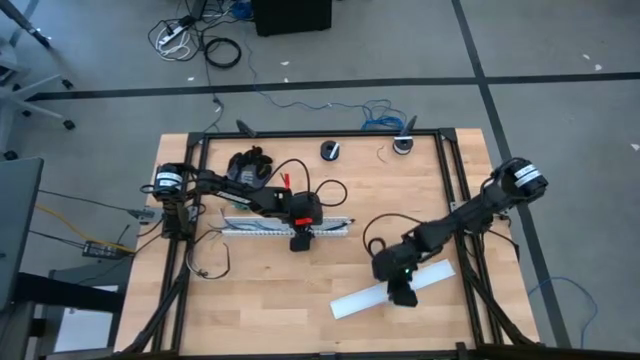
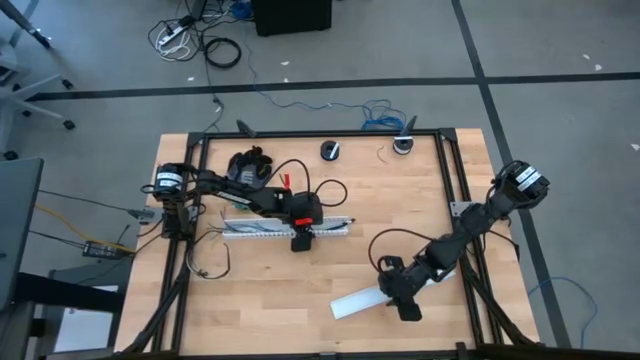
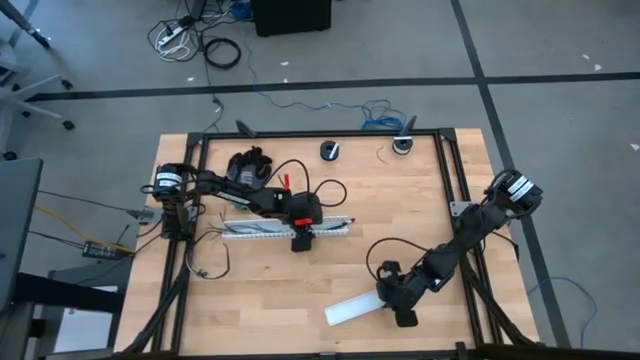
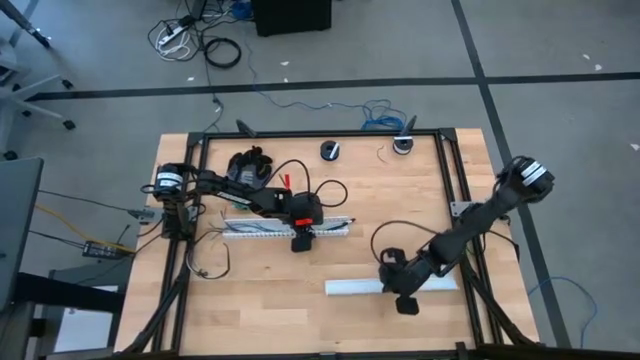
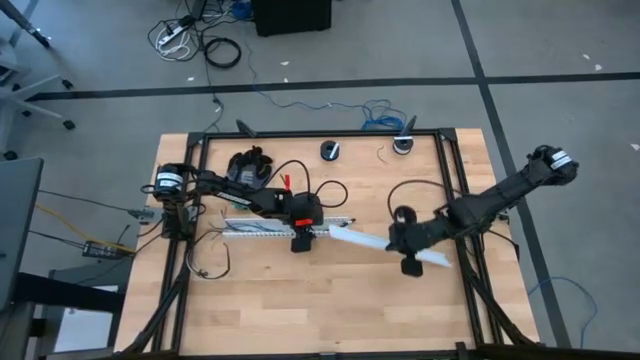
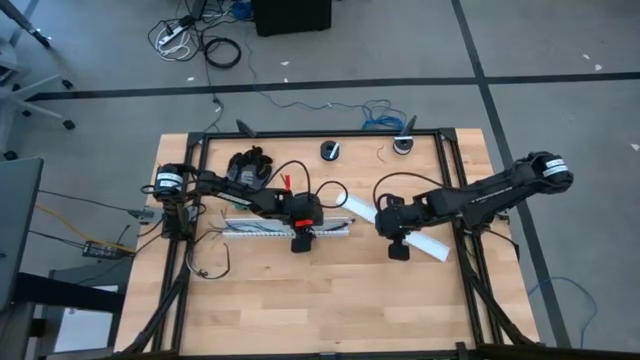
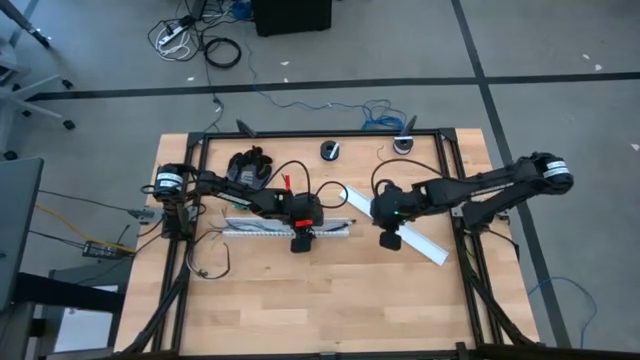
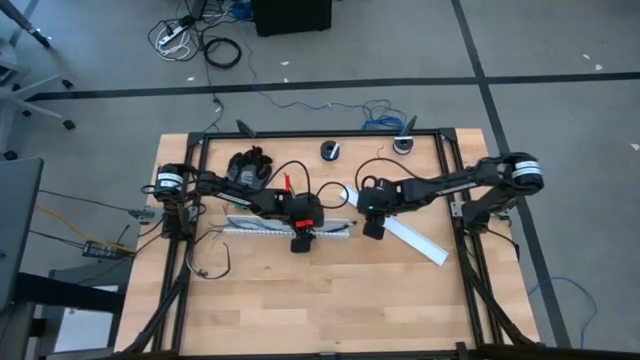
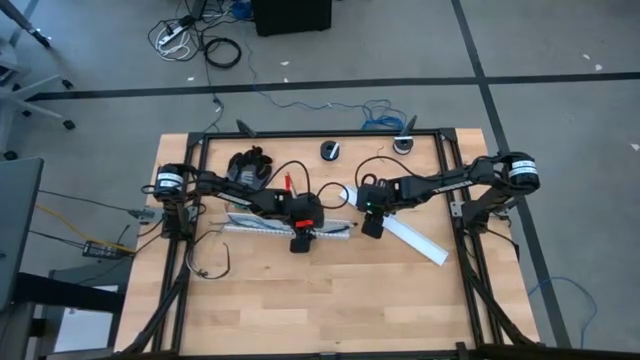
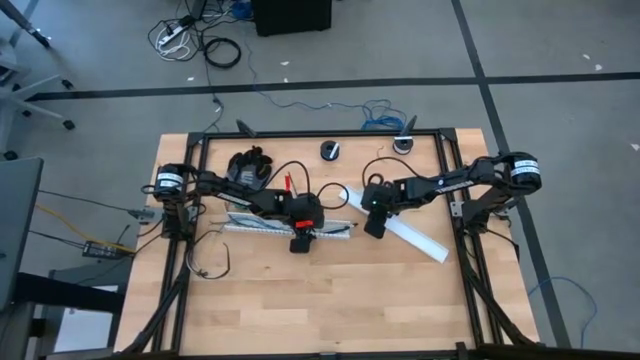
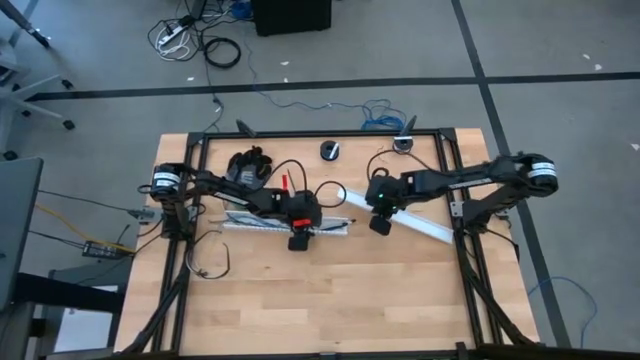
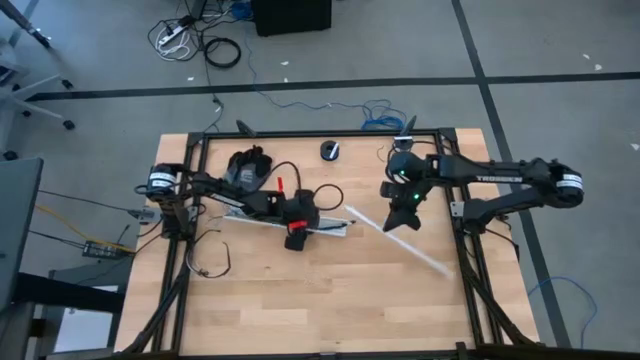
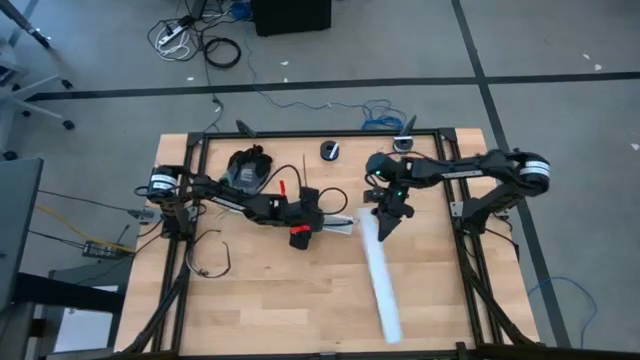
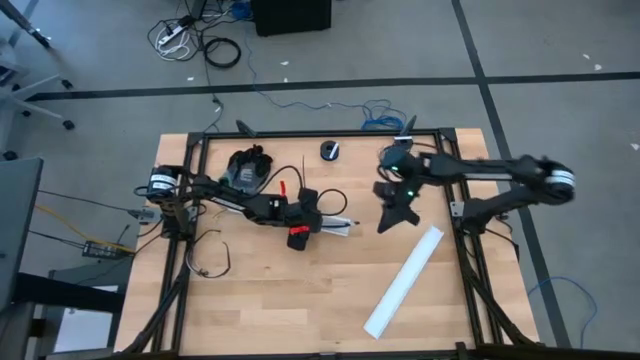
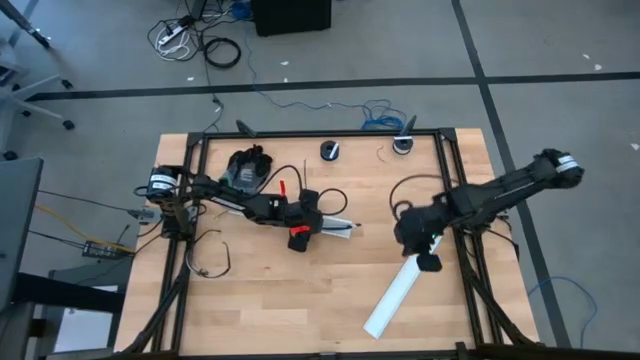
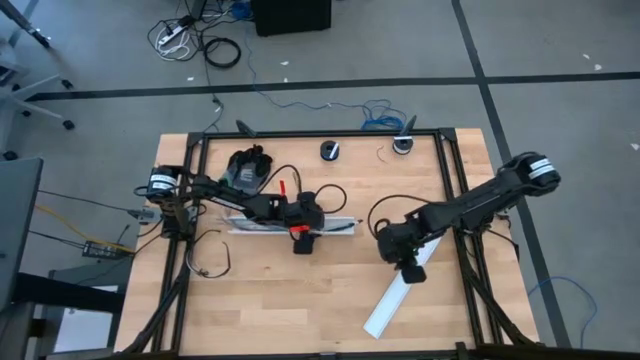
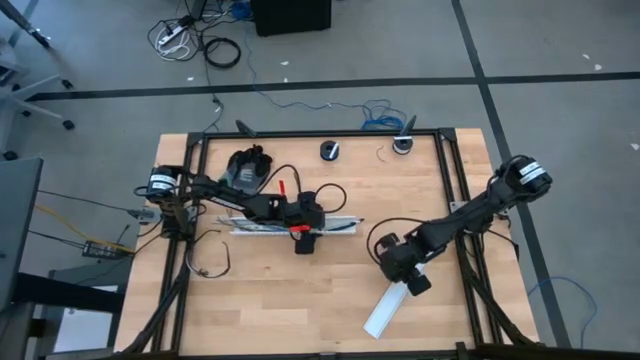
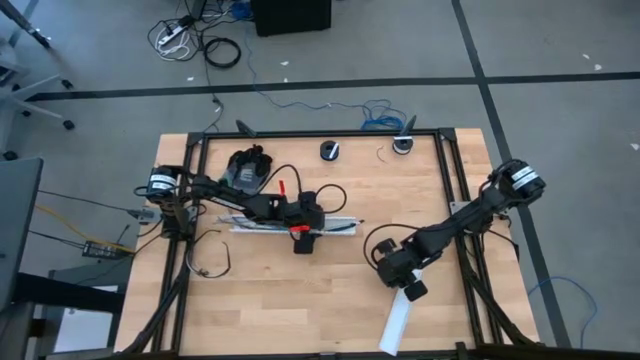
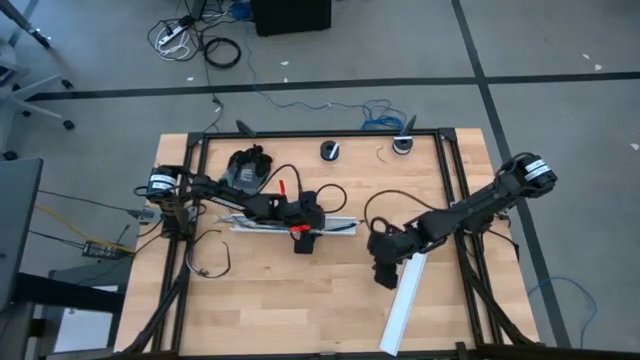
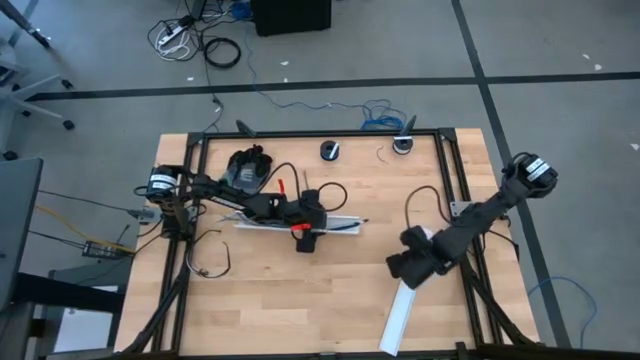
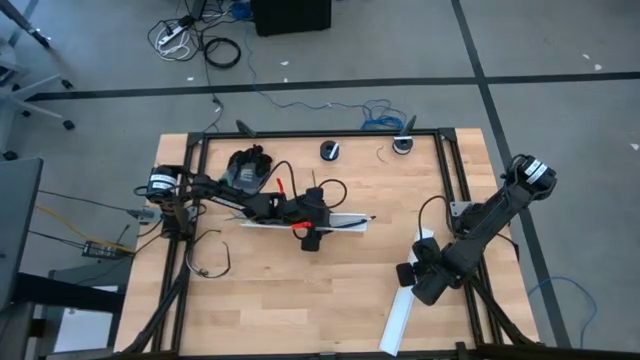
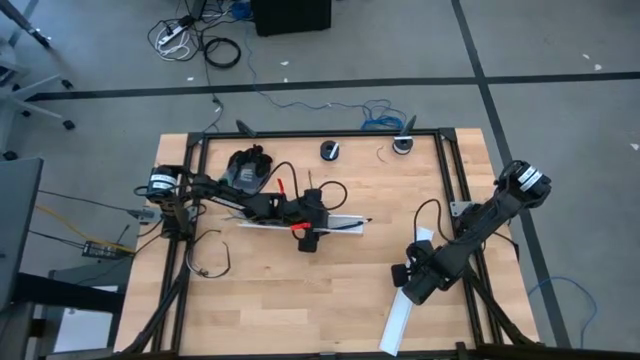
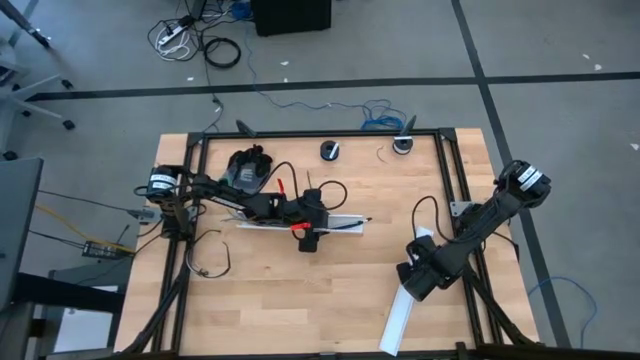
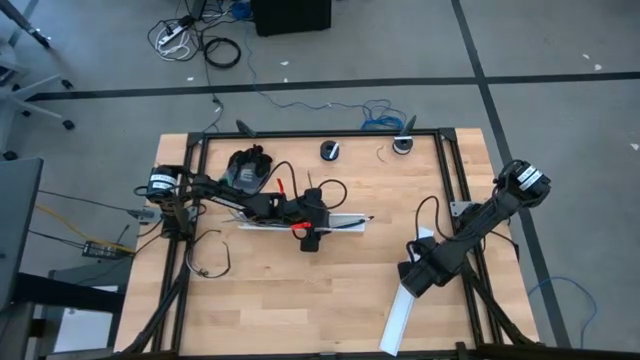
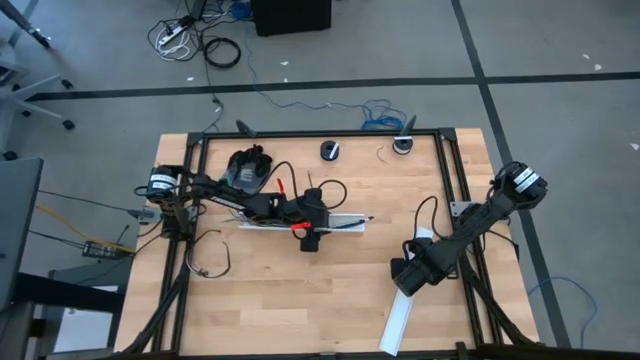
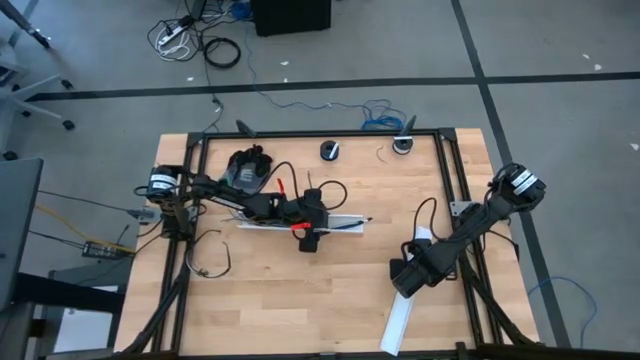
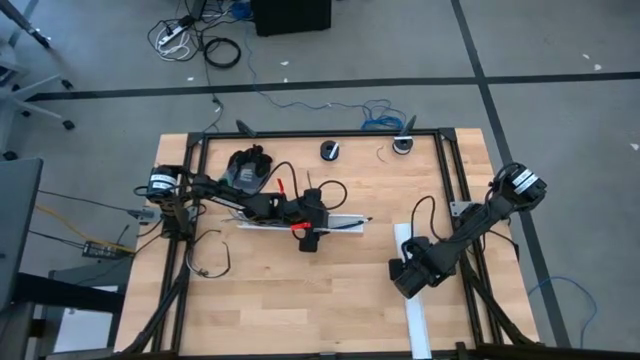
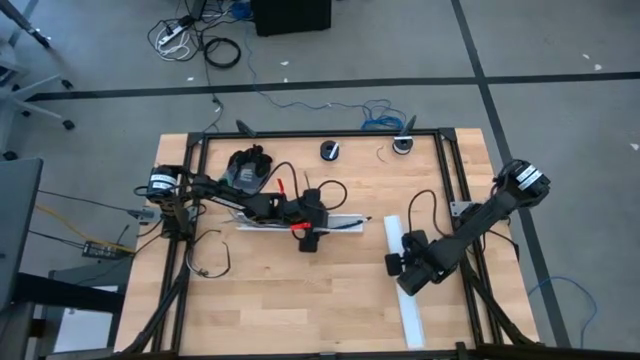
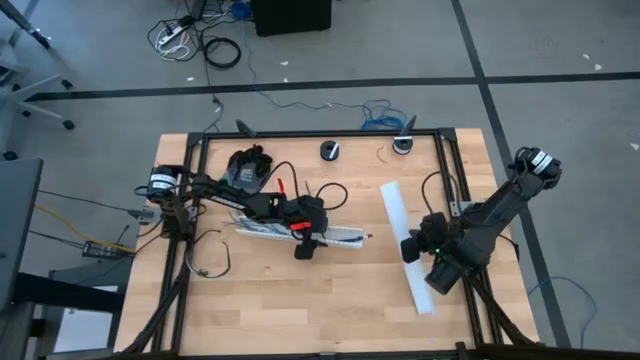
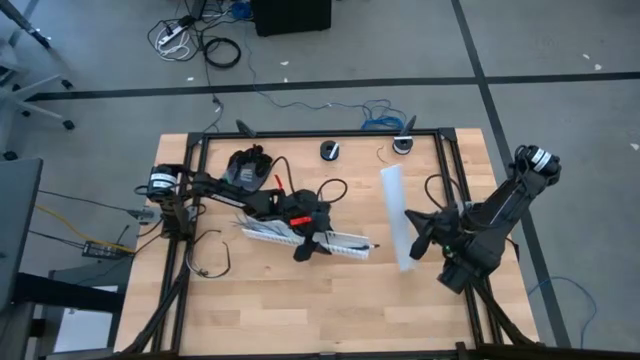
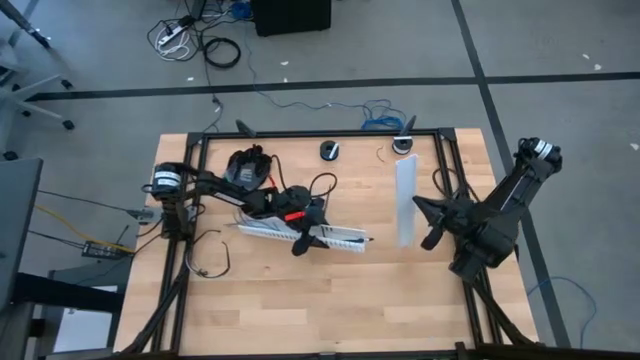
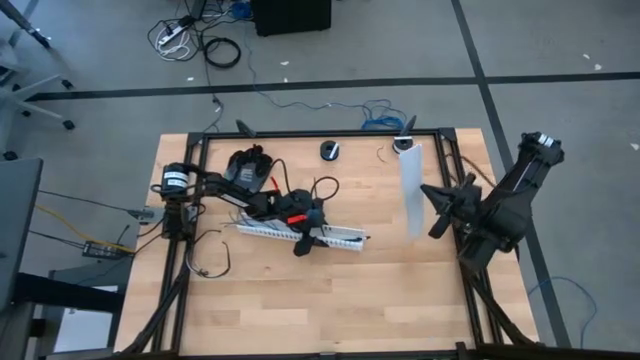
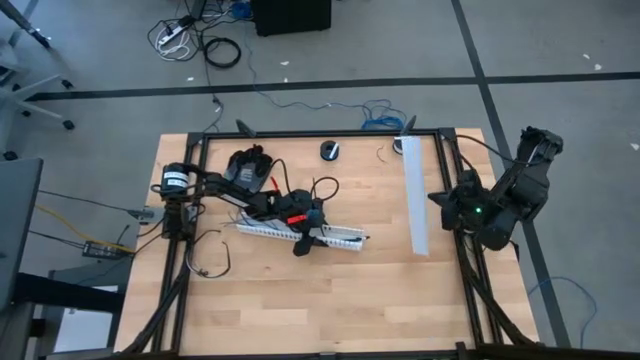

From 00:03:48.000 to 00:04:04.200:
Task: Ziptie cables
Close the white cable duct

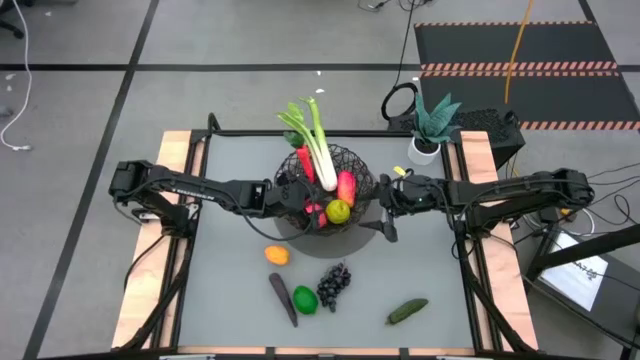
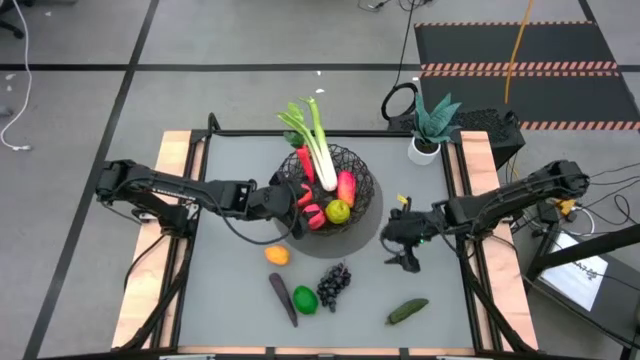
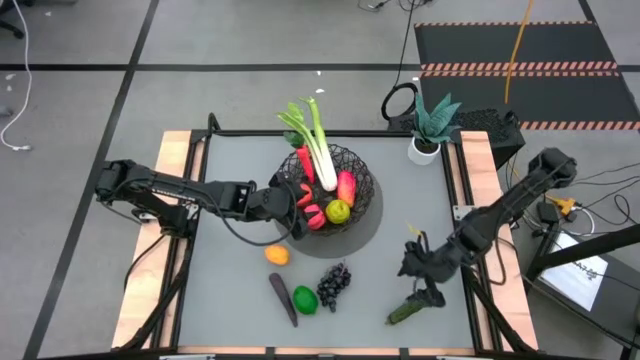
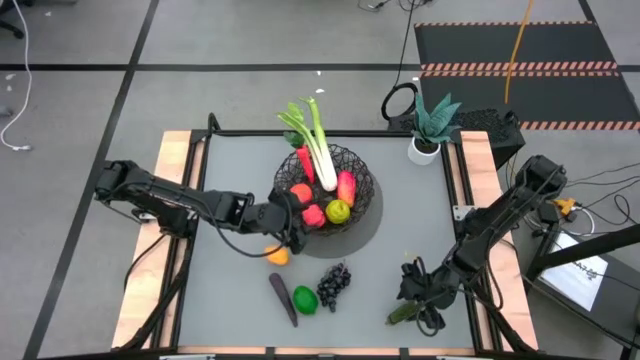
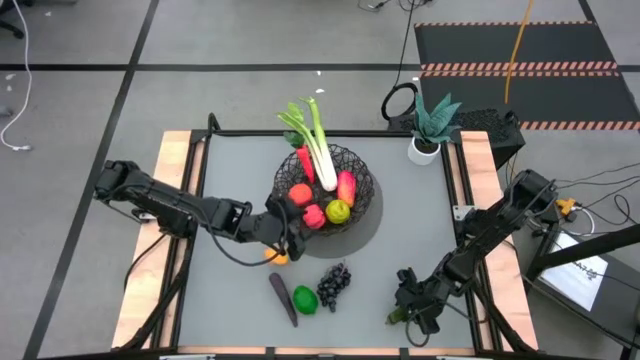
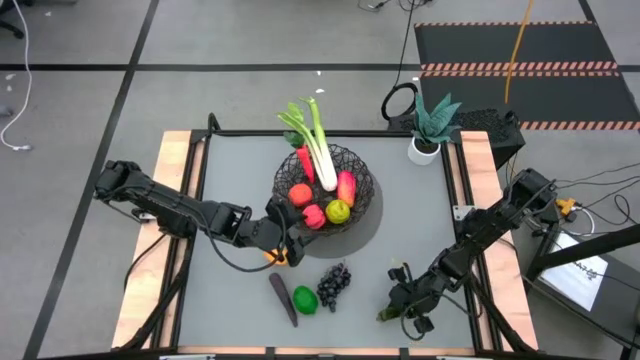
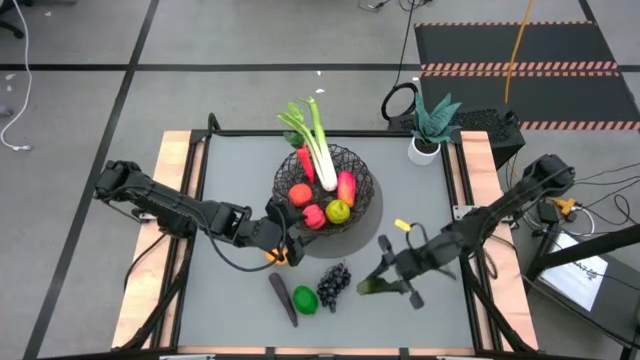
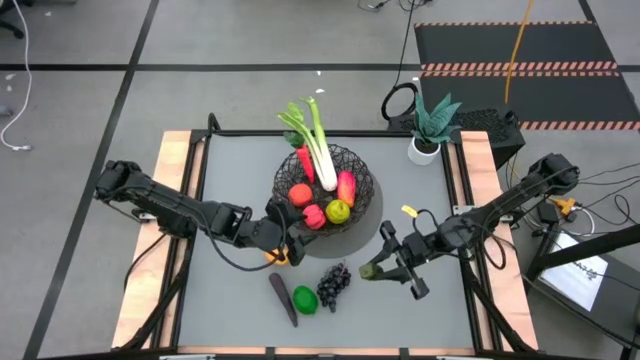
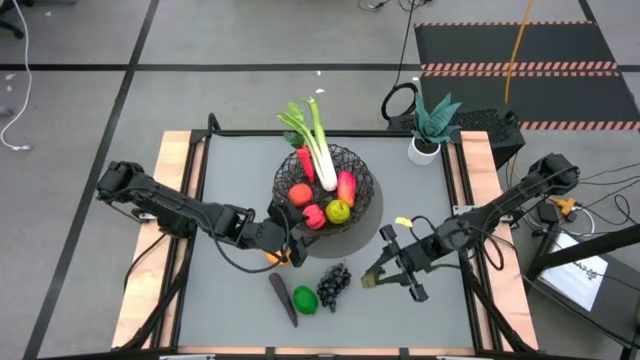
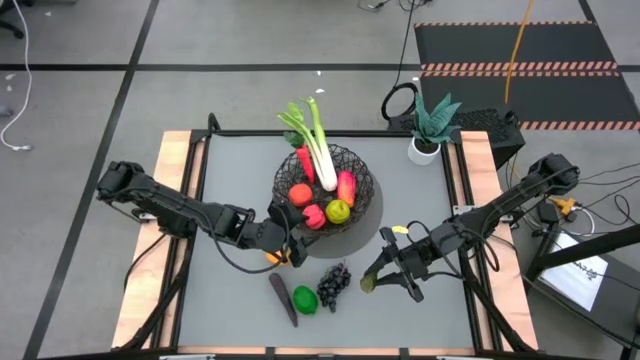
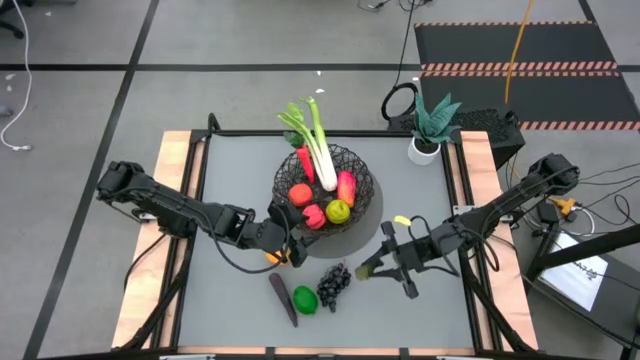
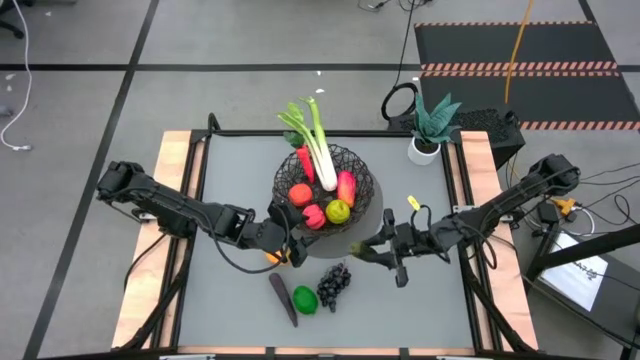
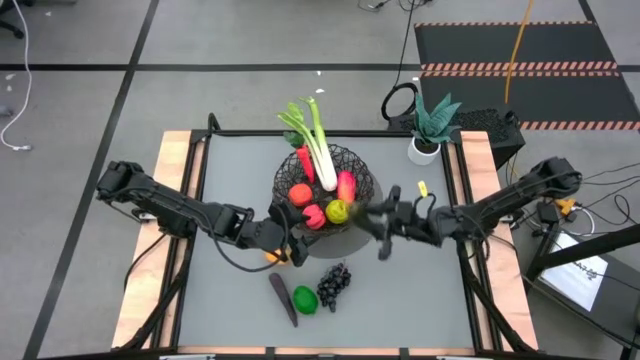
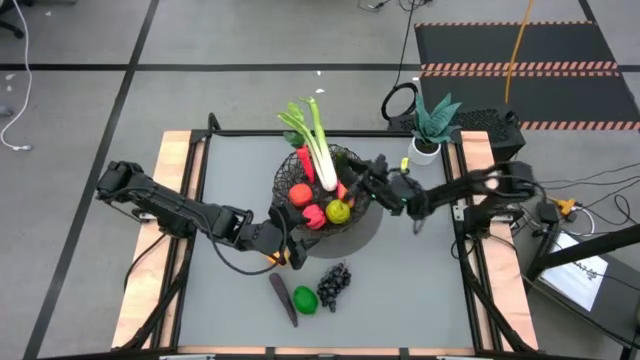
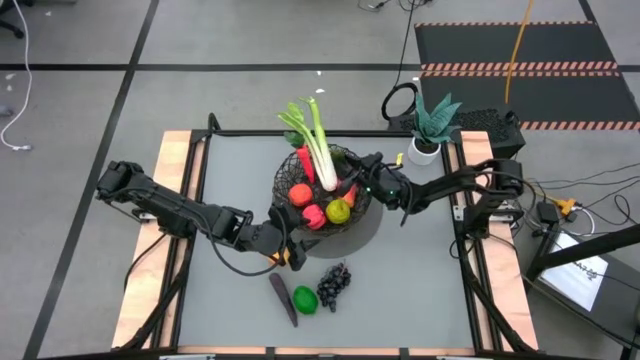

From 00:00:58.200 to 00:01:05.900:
Task: Build produce basket
Put the green chili pepper into the black woven basket
